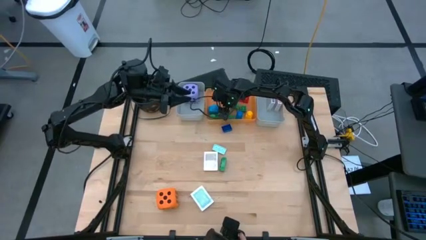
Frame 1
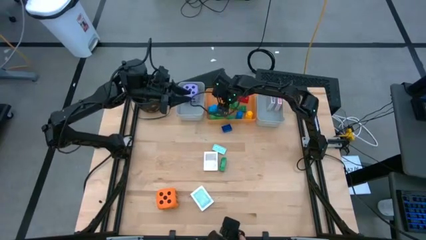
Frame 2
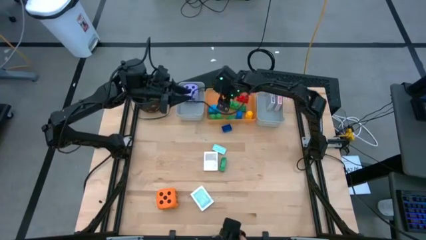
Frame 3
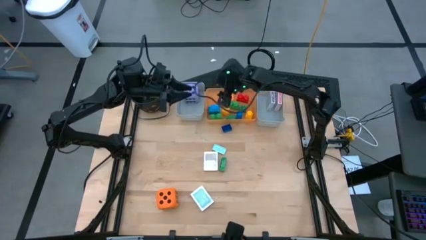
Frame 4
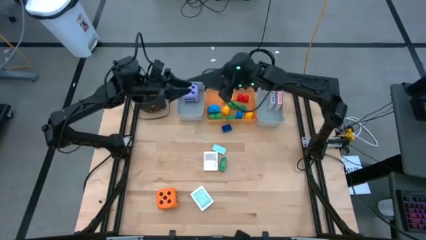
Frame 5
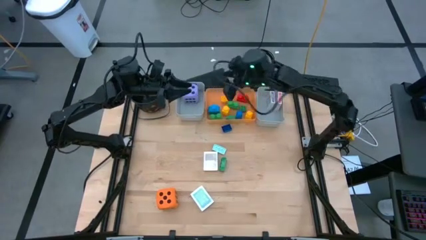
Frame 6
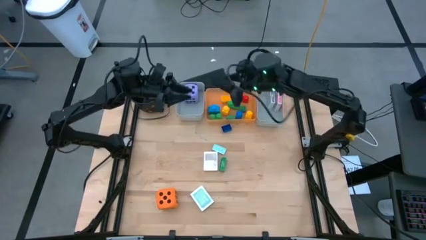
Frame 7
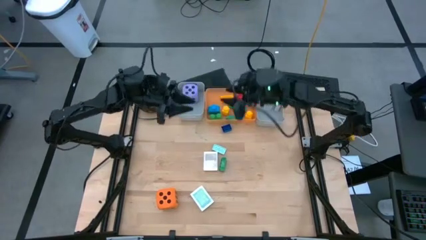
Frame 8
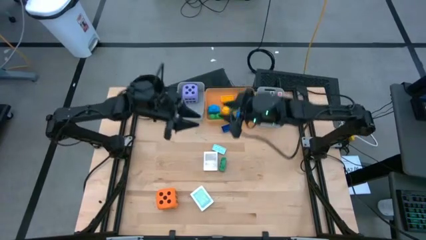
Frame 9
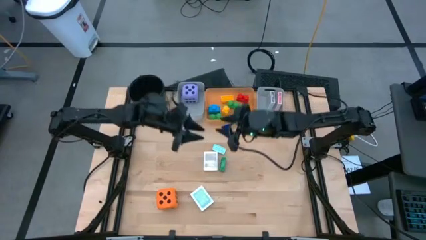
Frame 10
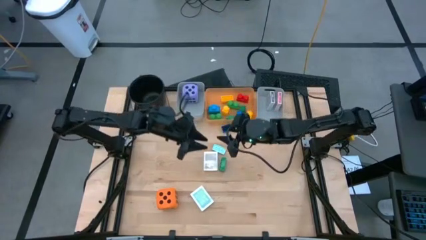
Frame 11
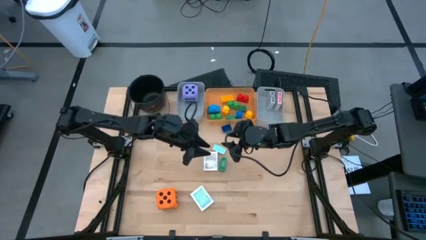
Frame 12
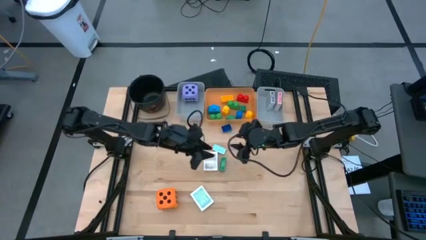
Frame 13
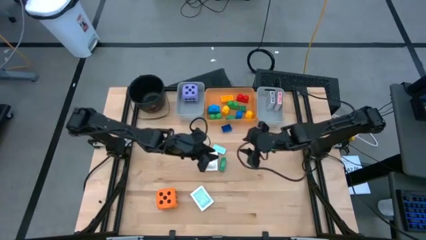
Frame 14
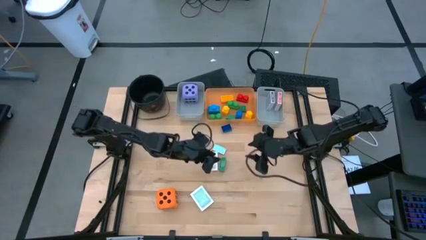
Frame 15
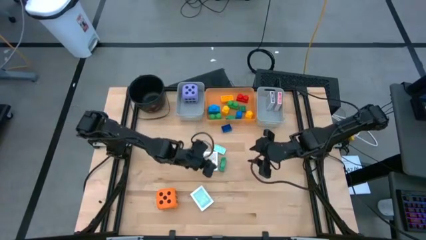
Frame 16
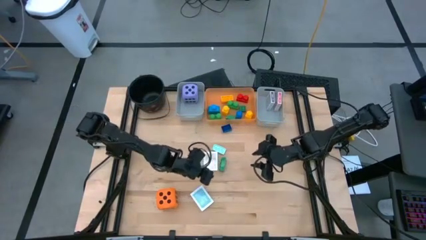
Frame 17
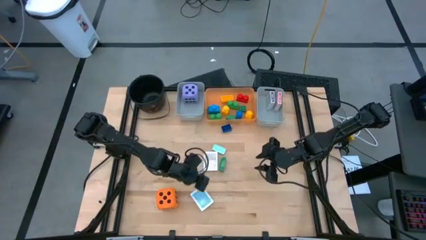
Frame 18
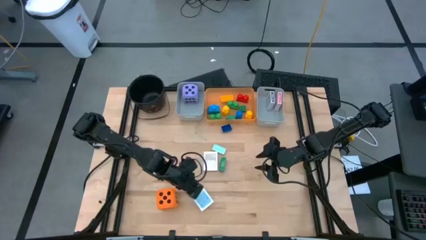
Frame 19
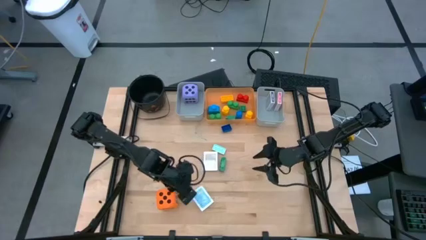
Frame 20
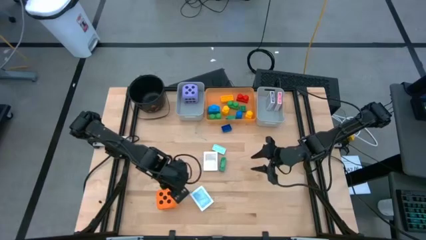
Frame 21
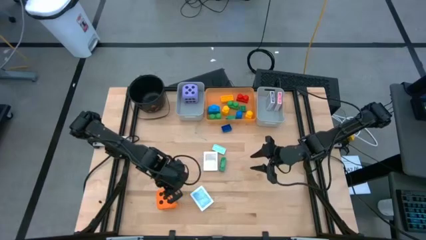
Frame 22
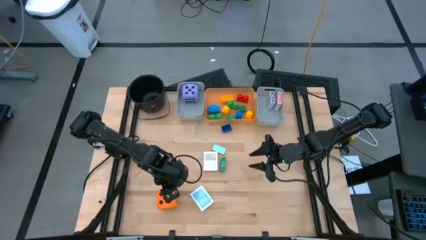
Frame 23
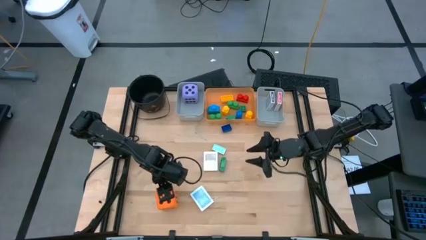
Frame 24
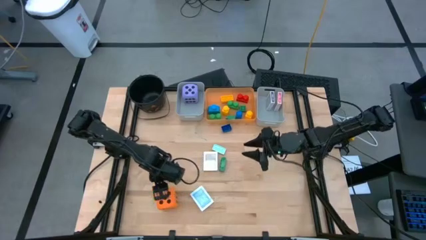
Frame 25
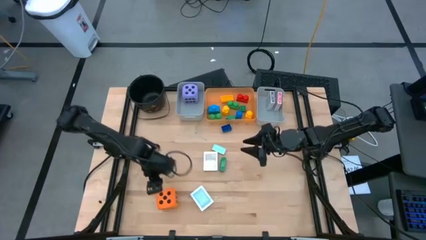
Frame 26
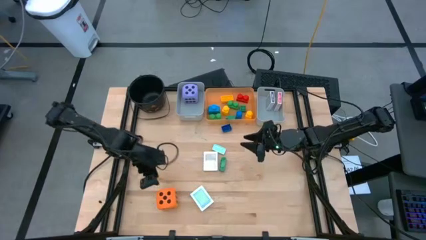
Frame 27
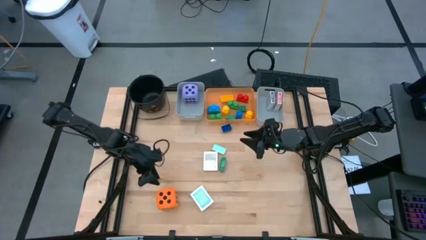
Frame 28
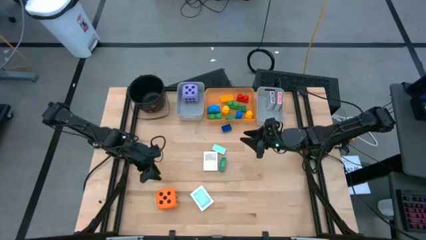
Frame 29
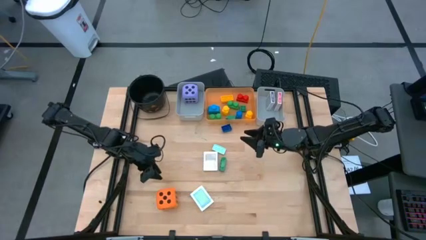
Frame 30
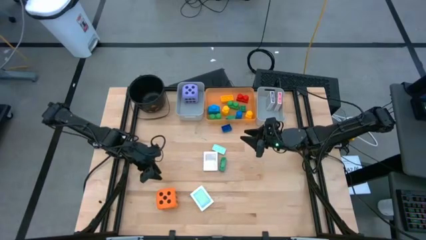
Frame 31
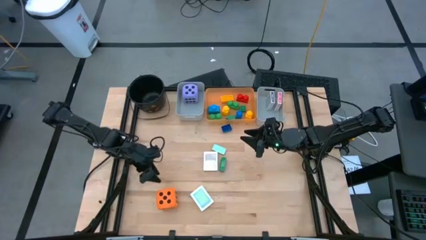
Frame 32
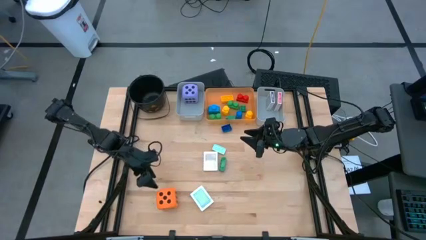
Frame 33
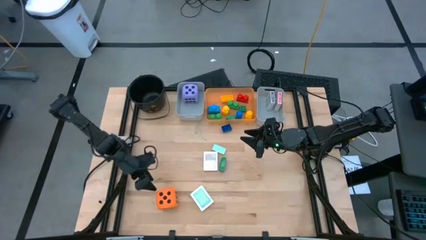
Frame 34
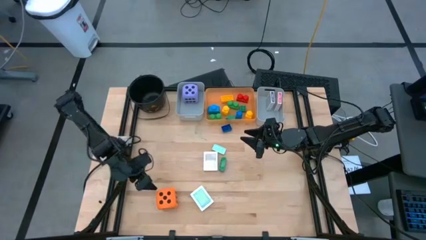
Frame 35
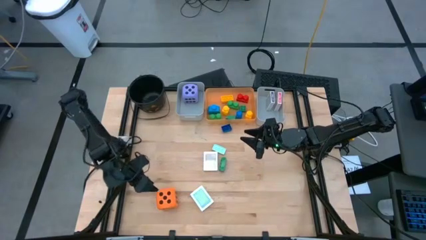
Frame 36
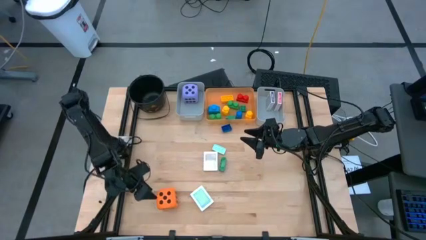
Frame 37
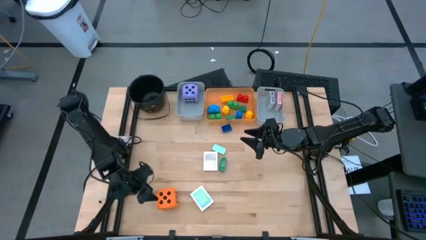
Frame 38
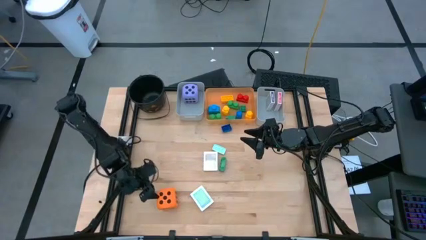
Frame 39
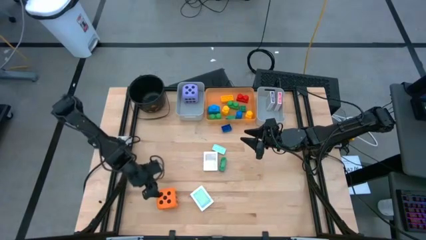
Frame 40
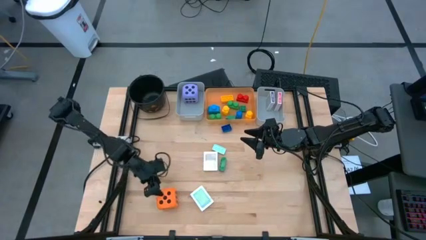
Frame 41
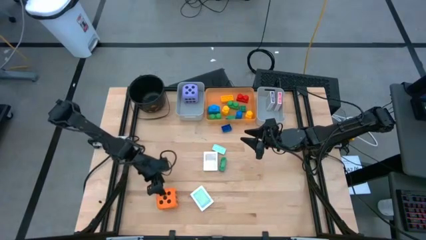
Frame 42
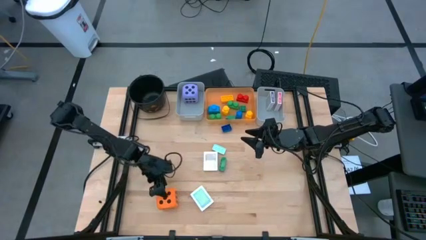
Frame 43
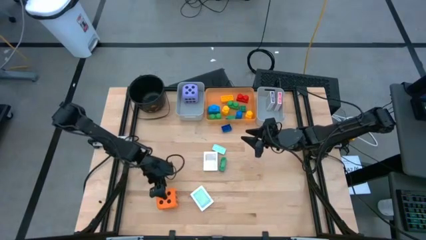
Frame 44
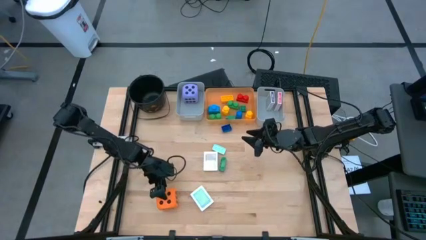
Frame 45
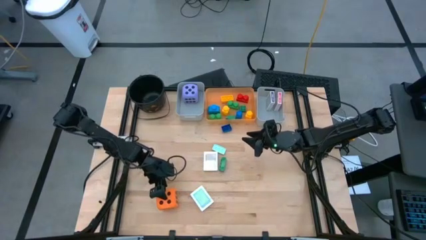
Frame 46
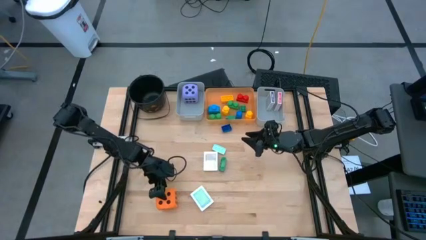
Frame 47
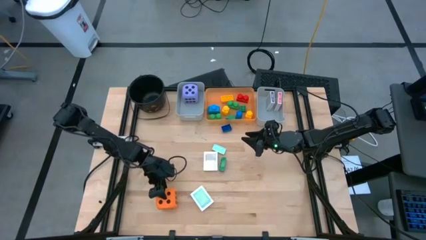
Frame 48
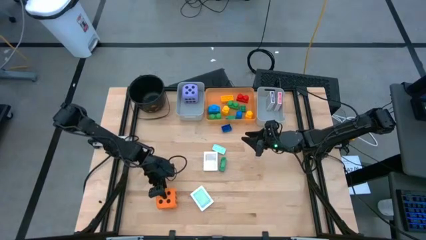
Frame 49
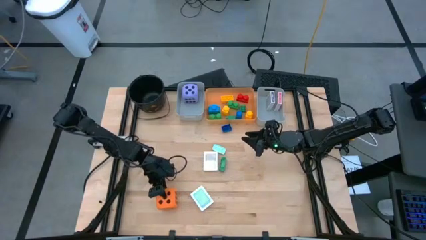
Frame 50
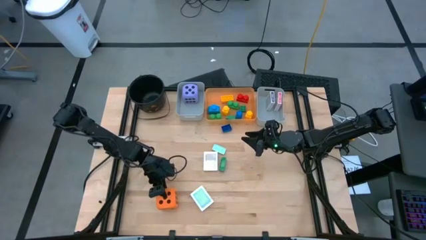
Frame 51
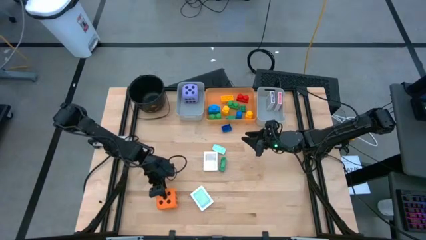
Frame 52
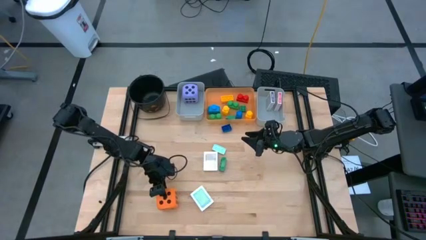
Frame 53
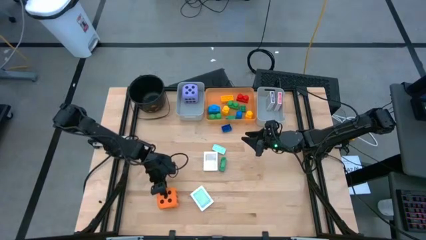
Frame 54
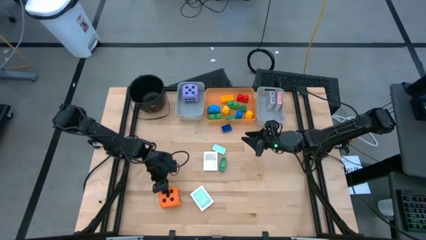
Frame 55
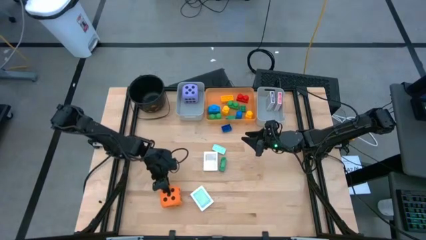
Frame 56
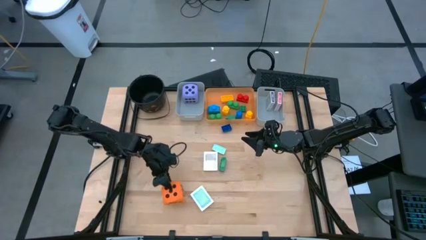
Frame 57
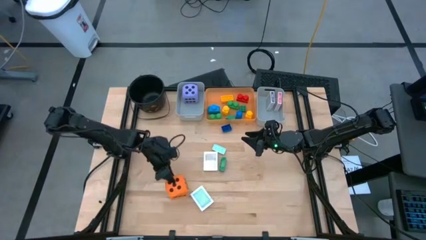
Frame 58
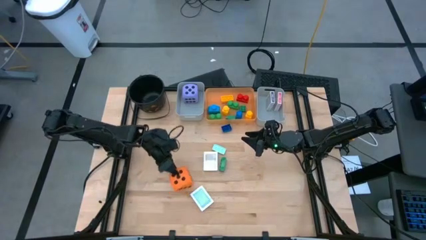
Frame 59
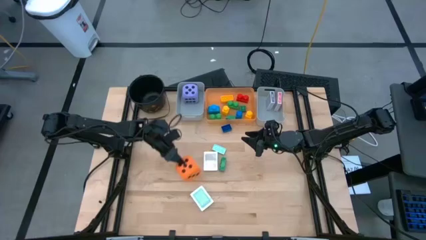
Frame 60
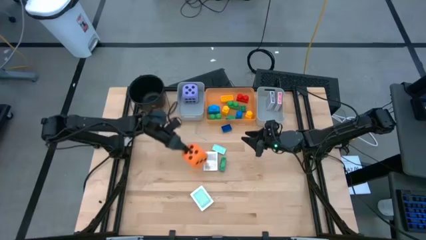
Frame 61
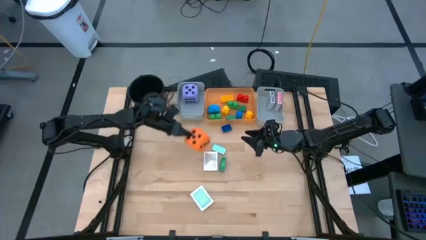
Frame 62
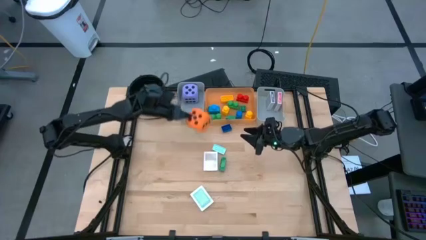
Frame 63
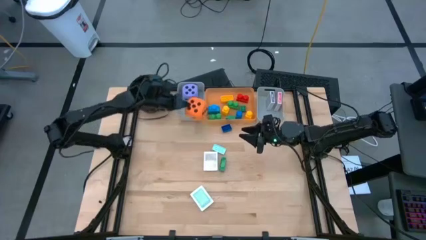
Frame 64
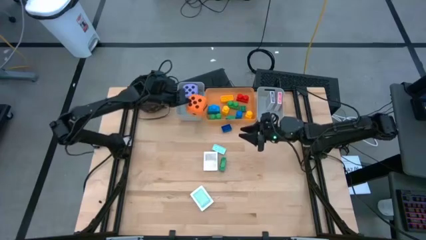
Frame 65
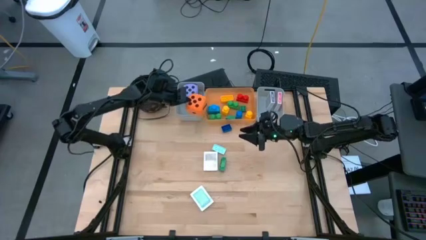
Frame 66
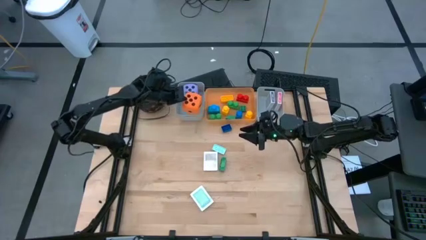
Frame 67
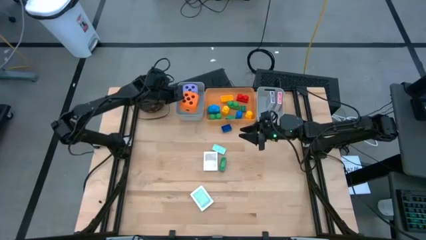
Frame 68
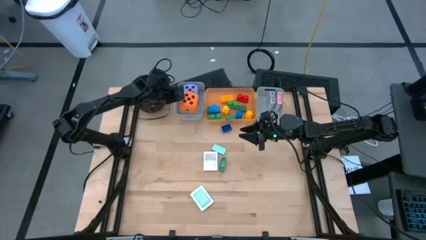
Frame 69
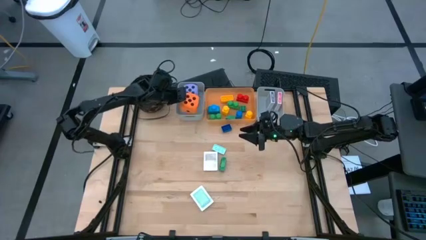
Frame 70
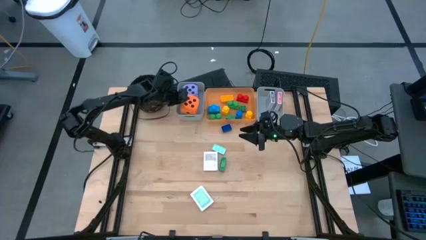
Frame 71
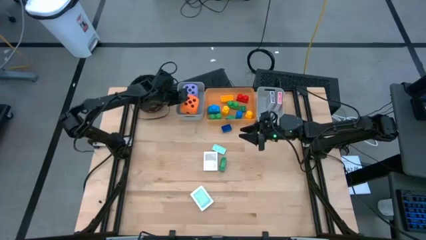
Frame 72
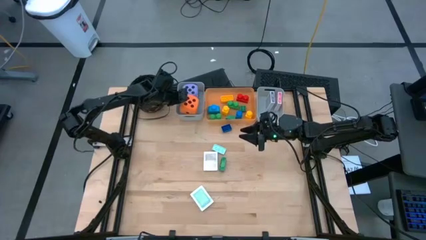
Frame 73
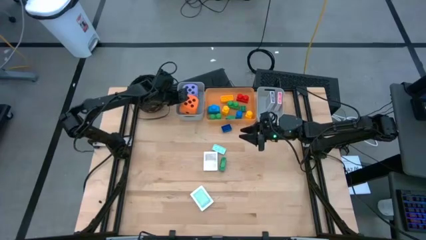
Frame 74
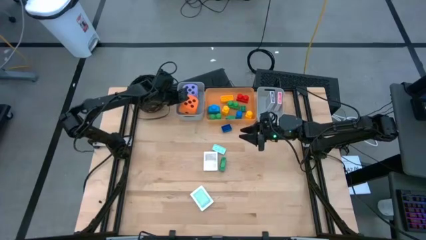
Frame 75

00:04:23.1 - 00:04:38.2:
Task: Pick & Place Toys
Put the orange dice into the left gray bin
